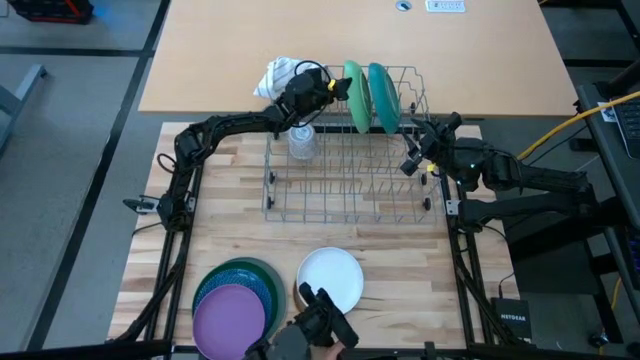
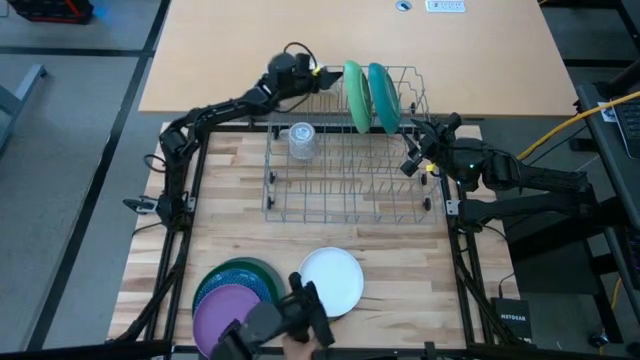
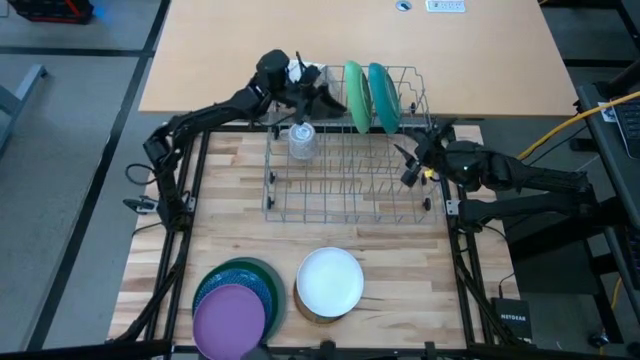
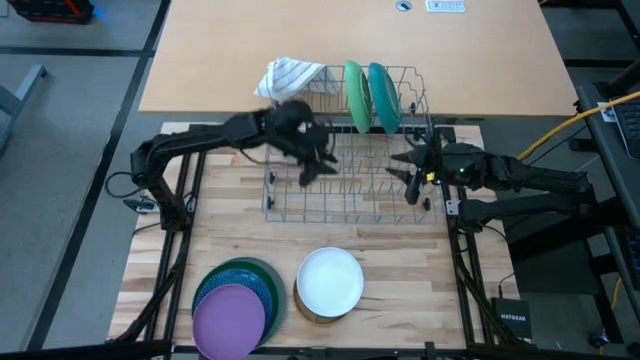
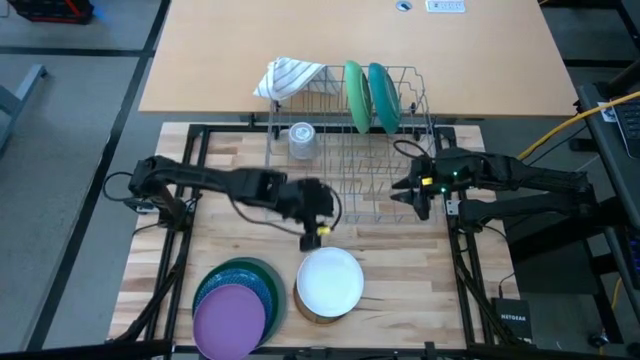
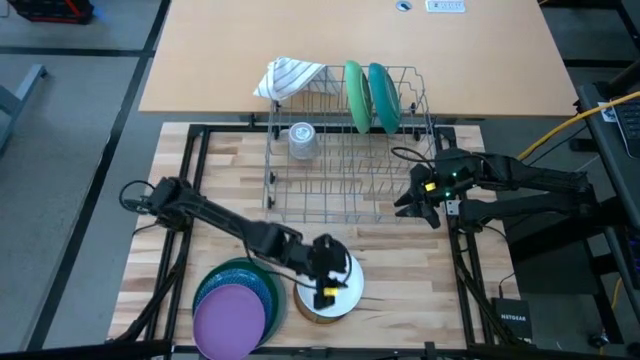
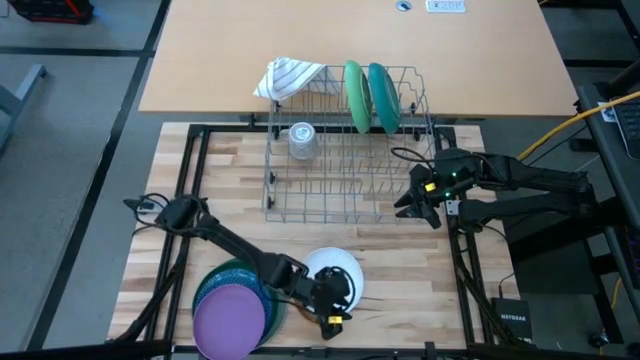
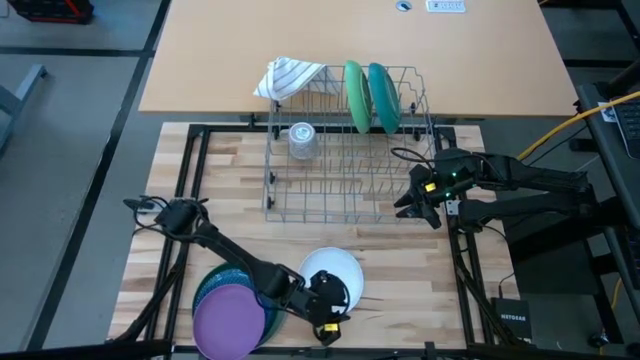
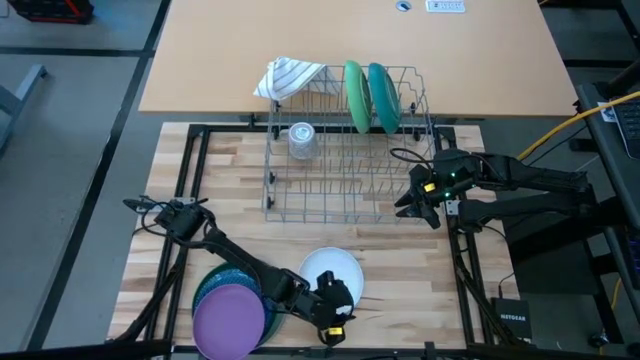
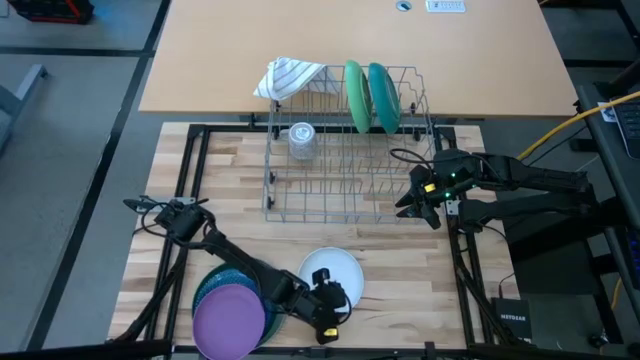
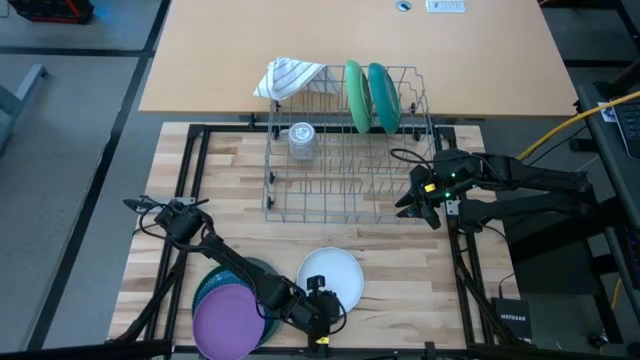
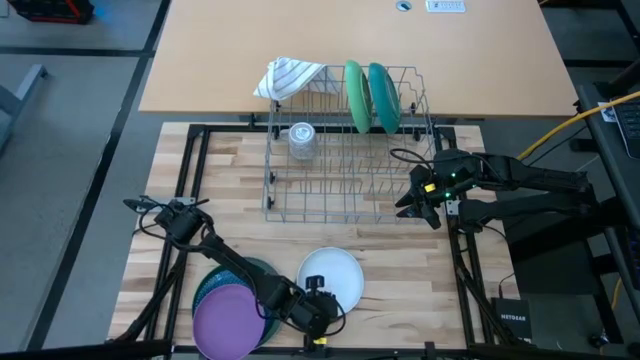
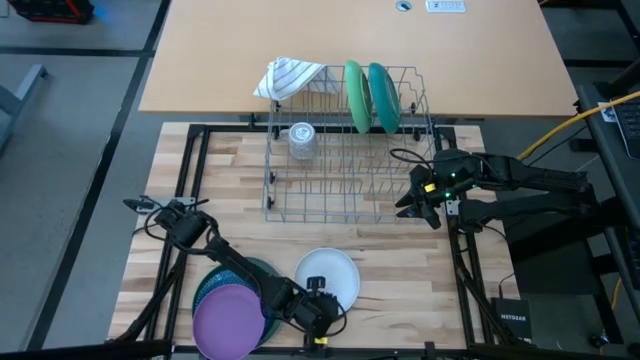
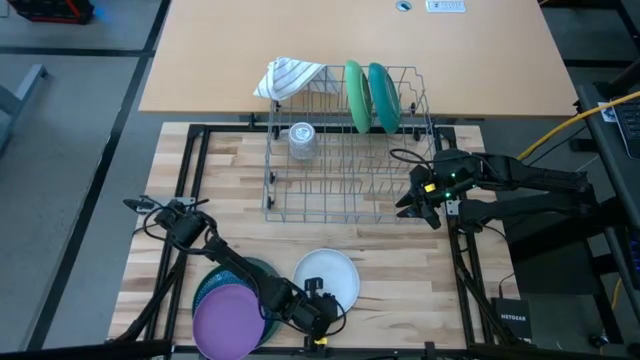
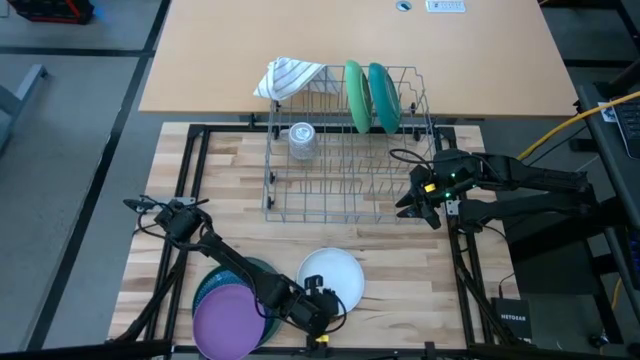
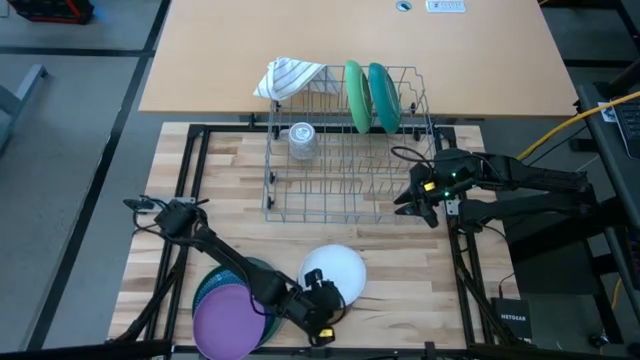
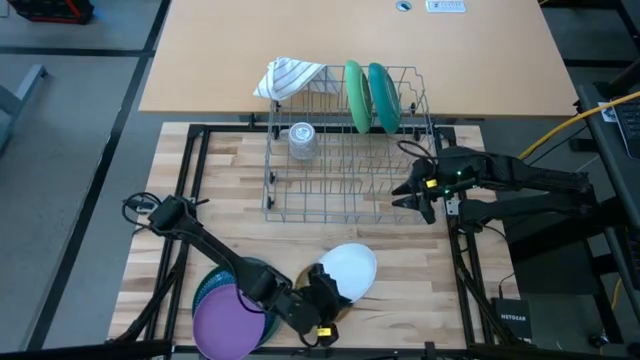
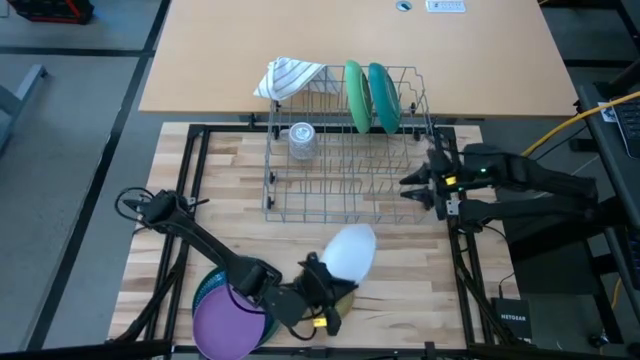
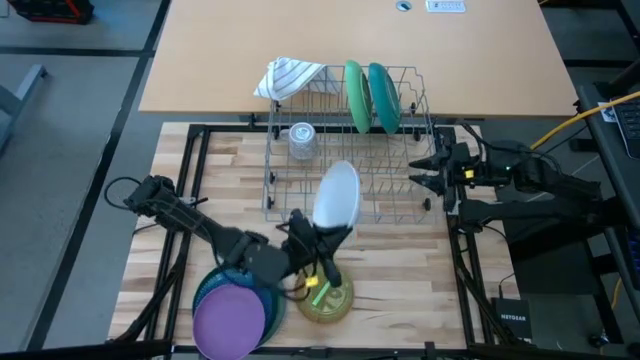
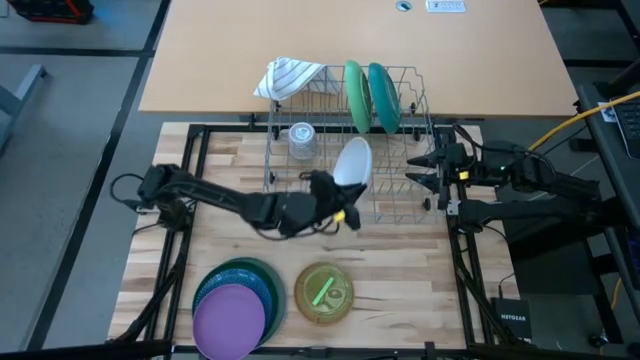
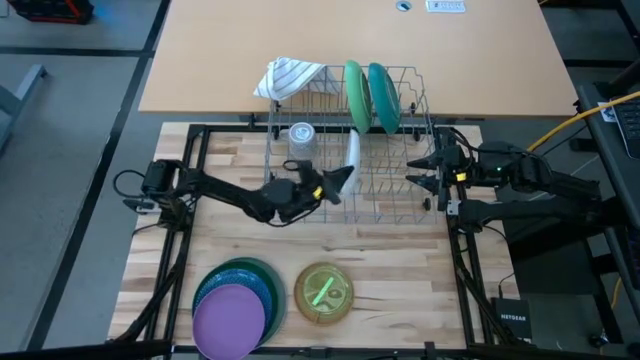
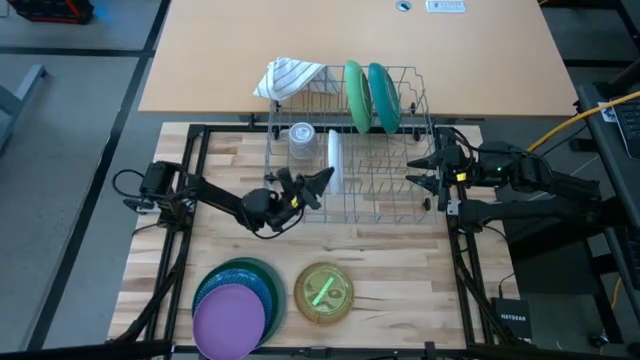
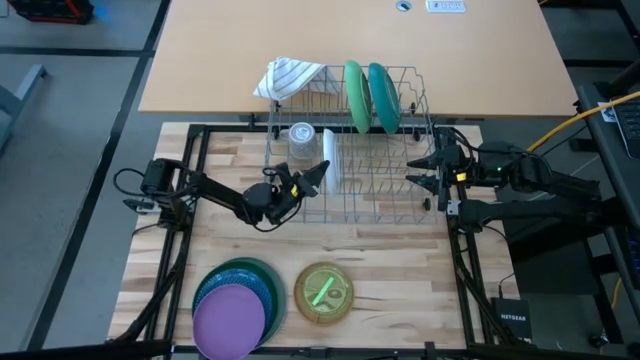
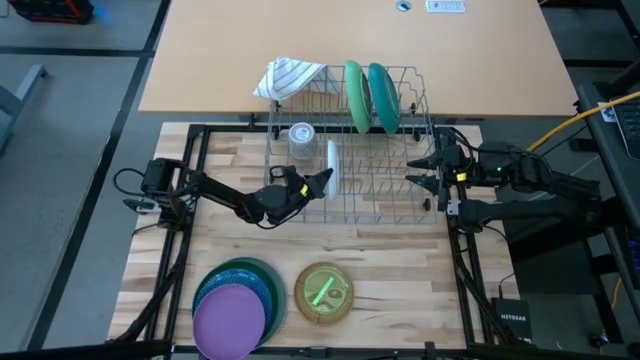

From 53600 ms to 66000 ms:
Task: Sort dishes
Put the white plate in the dishwasher rack

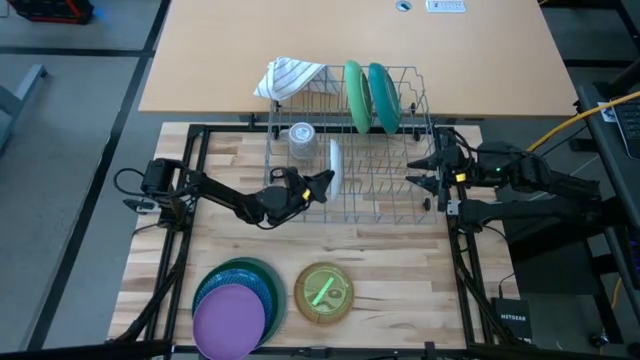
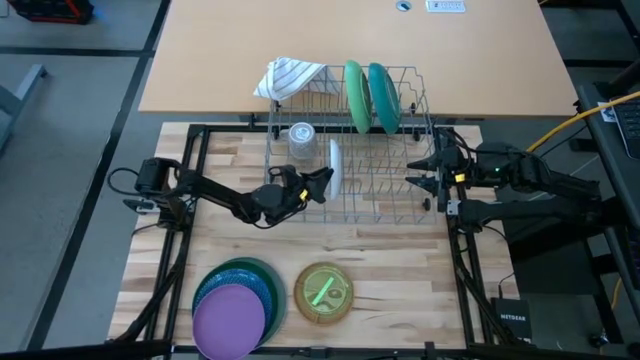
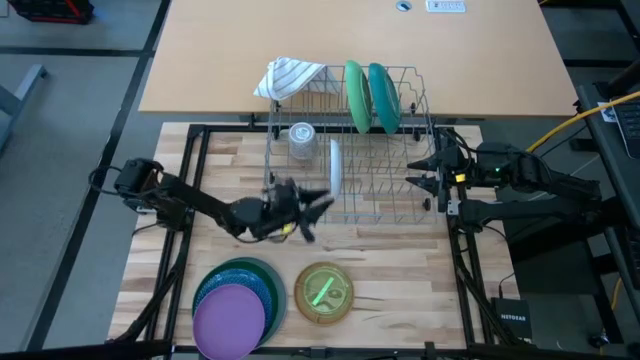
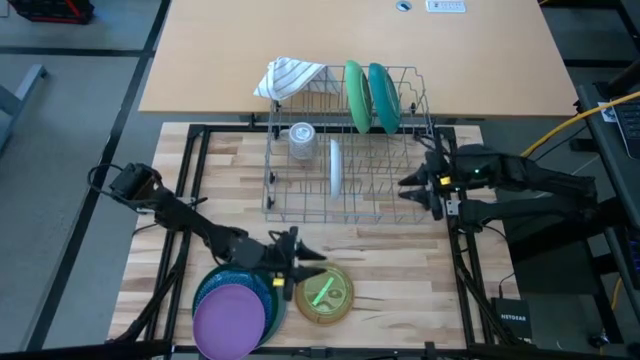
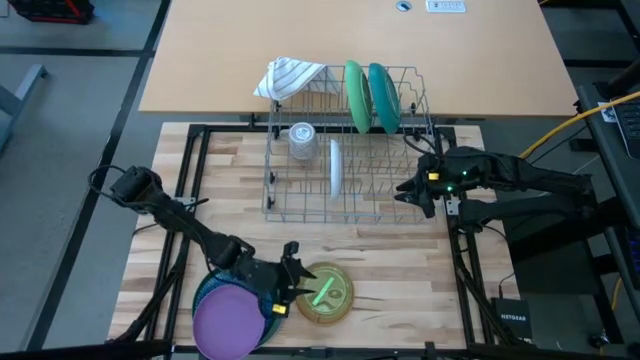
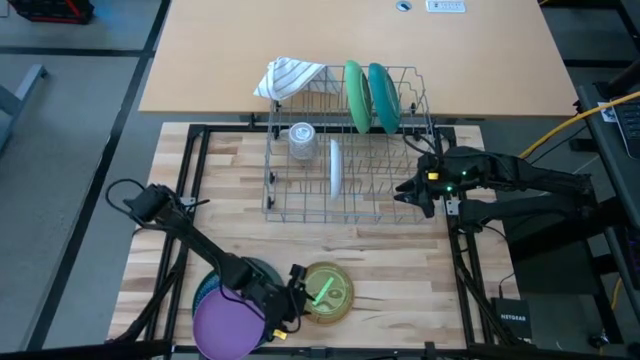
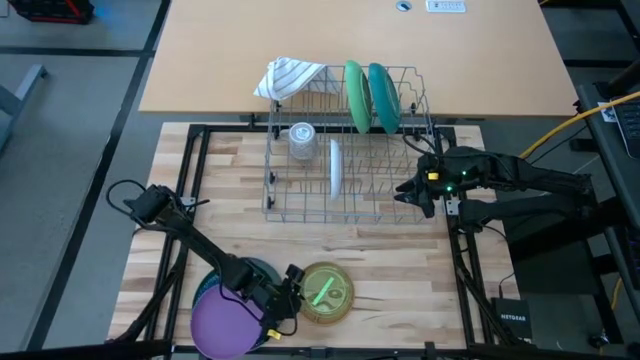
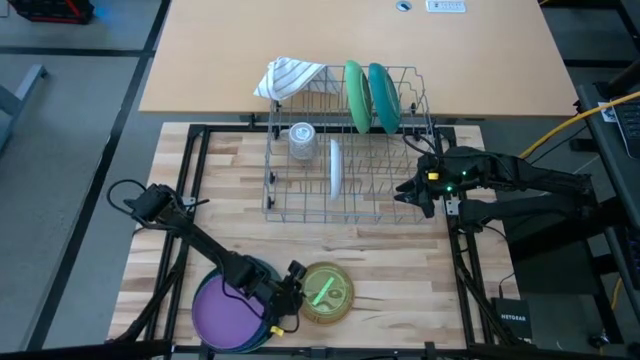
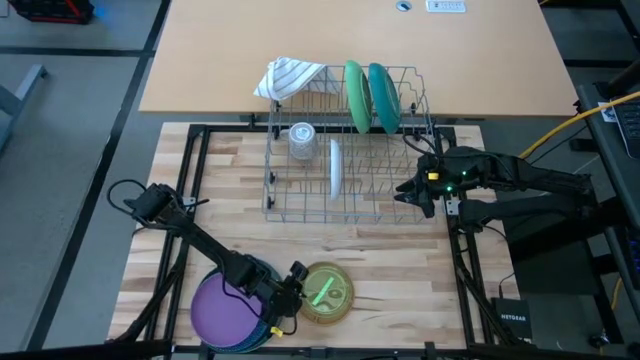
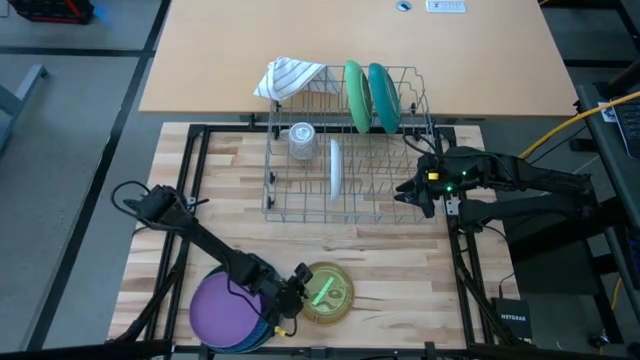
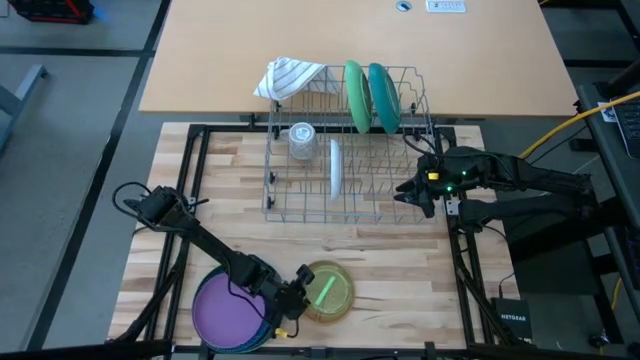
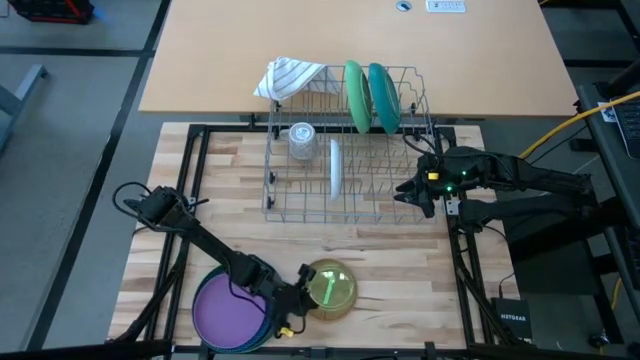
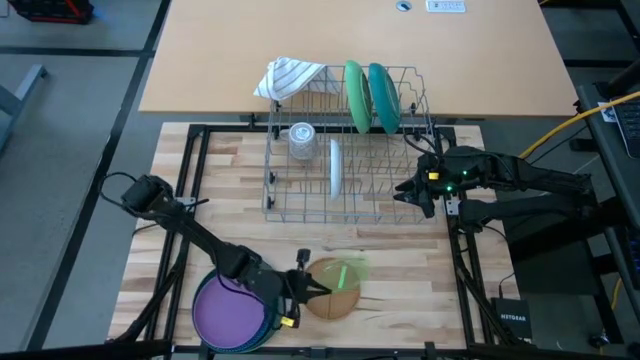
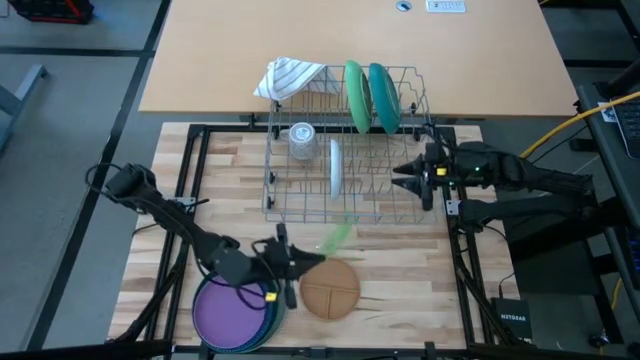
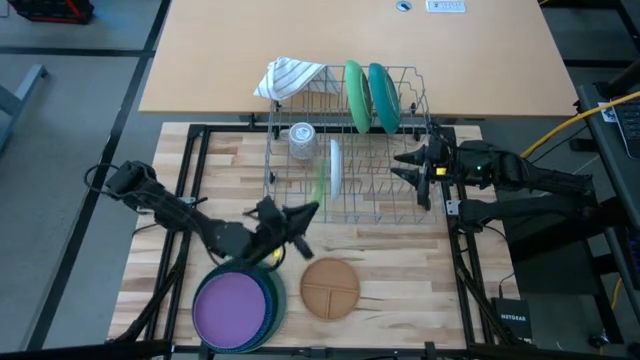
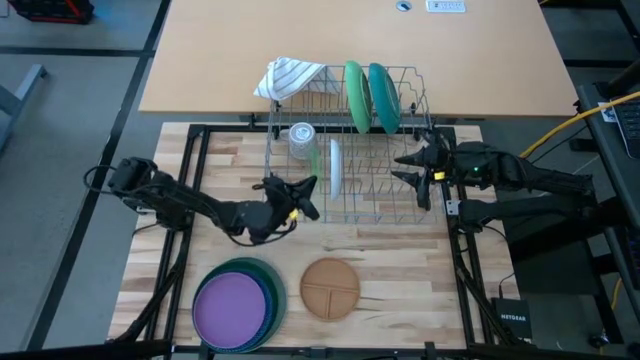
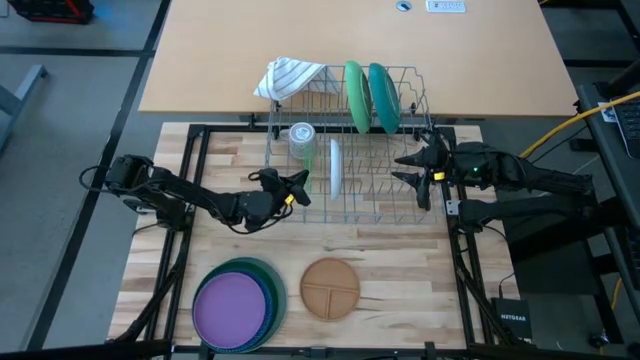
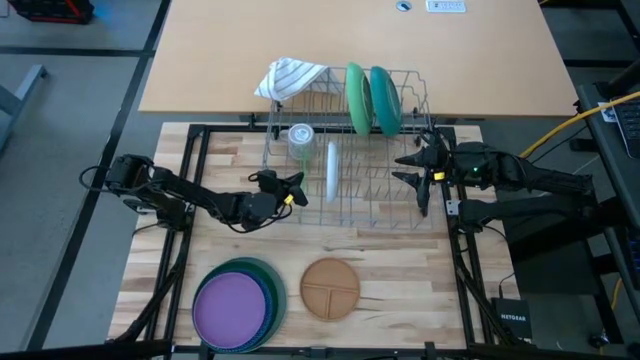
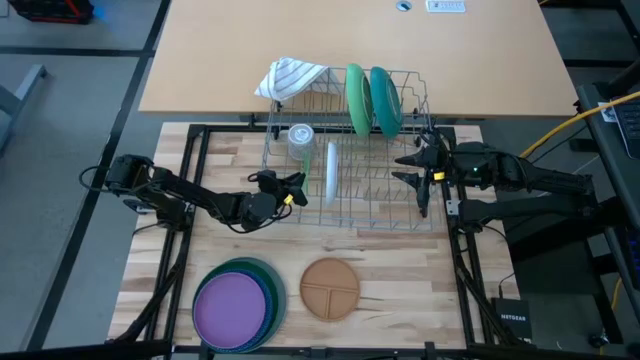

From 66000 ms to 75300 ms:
Put the transparent green plate in the dishwasher rack
